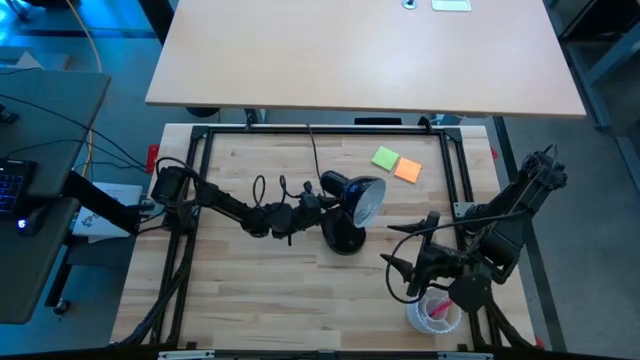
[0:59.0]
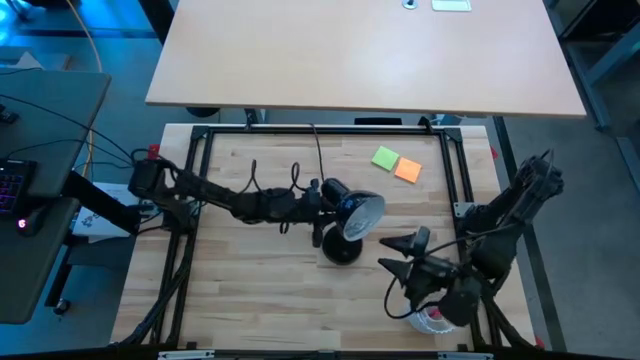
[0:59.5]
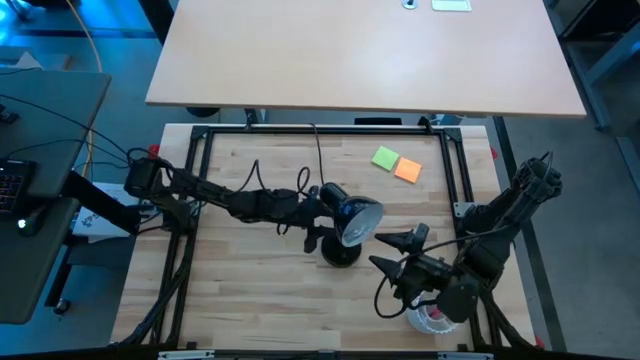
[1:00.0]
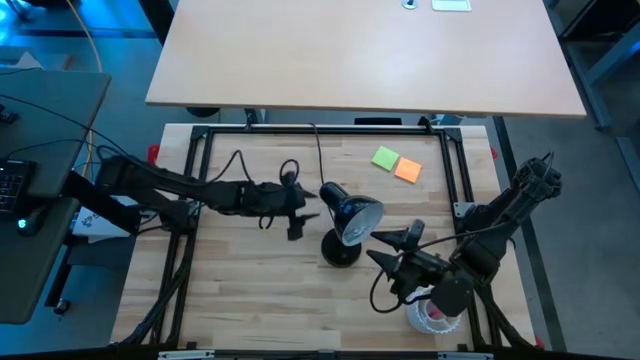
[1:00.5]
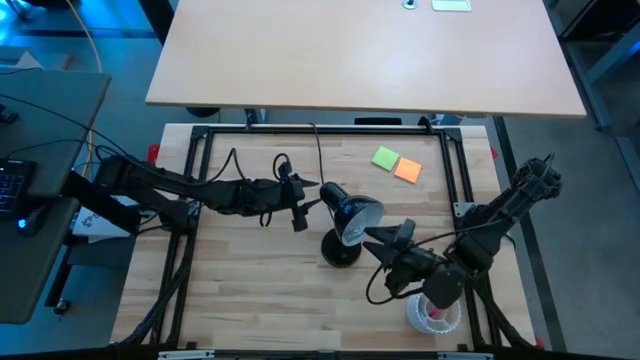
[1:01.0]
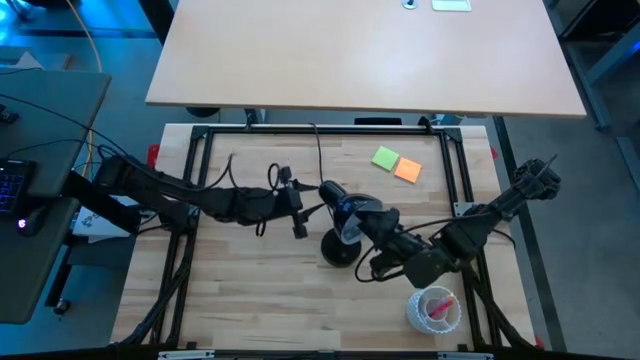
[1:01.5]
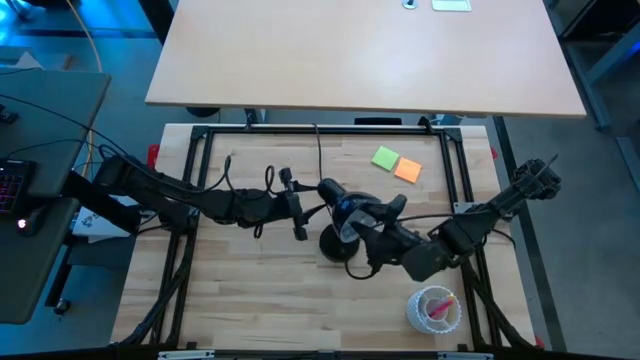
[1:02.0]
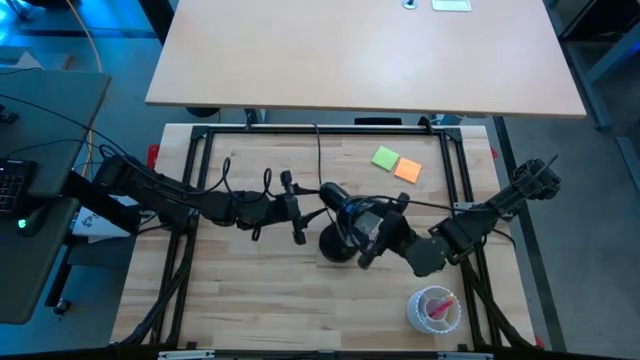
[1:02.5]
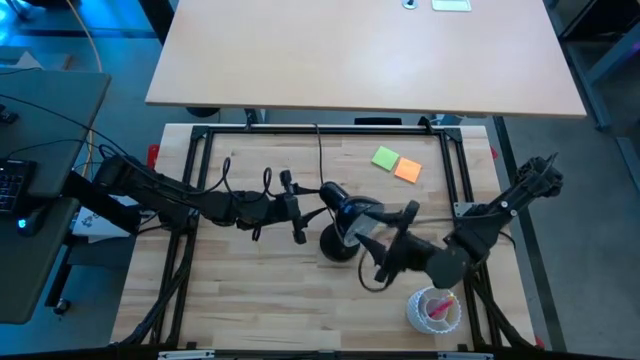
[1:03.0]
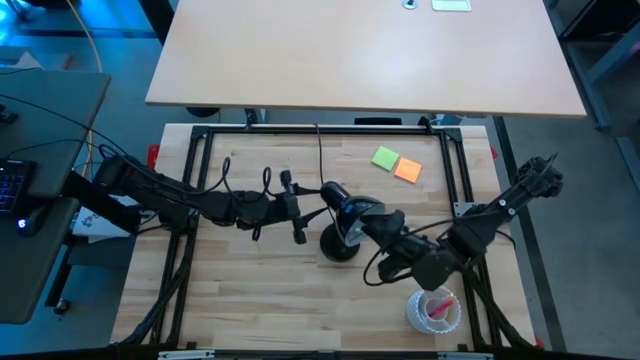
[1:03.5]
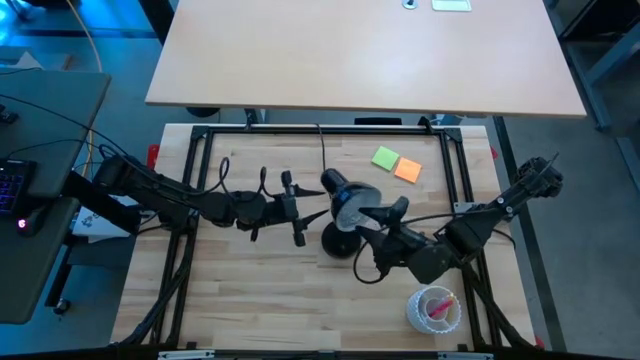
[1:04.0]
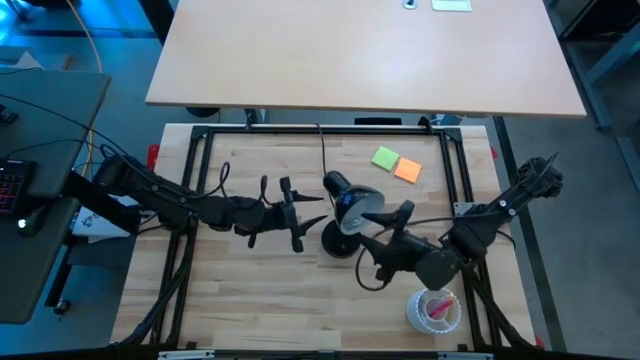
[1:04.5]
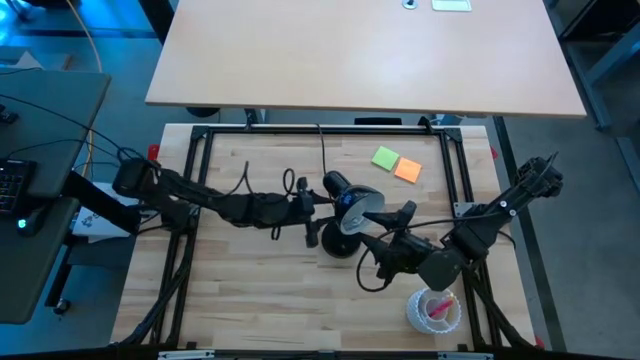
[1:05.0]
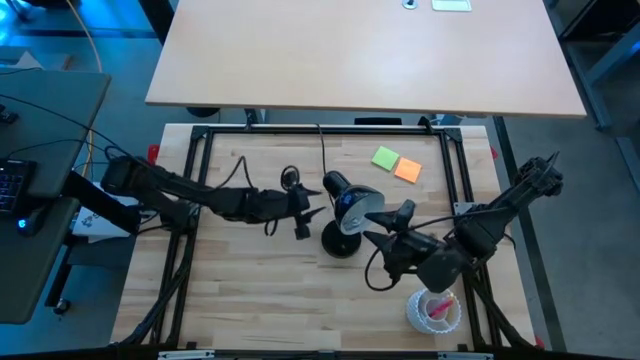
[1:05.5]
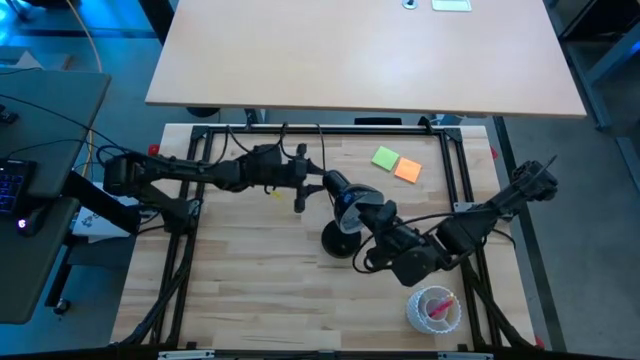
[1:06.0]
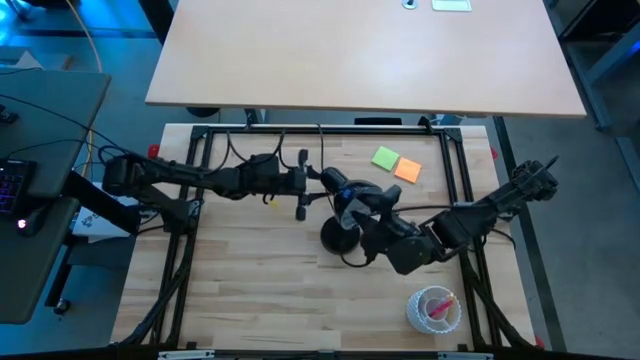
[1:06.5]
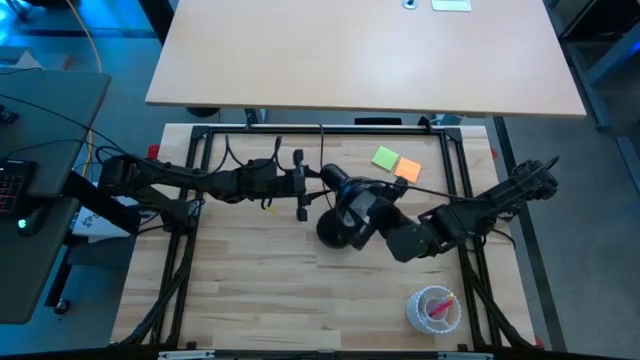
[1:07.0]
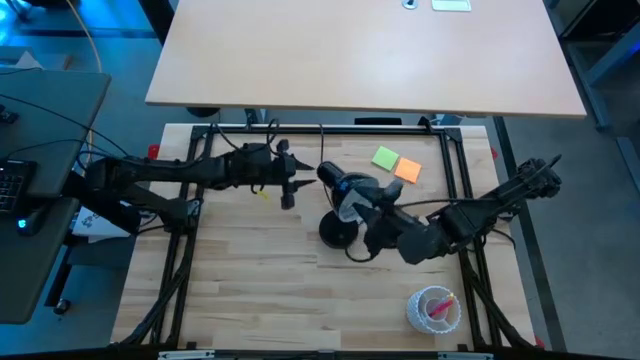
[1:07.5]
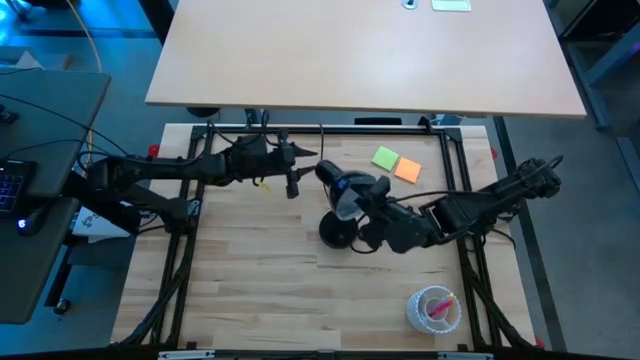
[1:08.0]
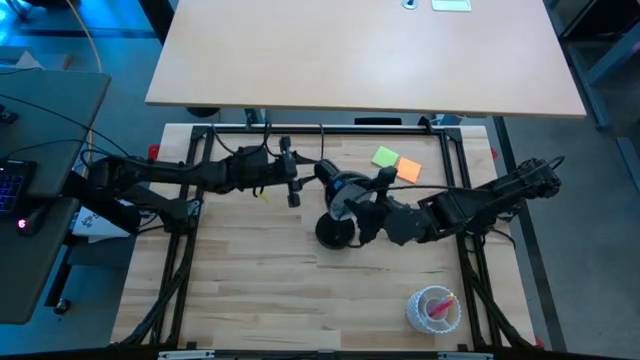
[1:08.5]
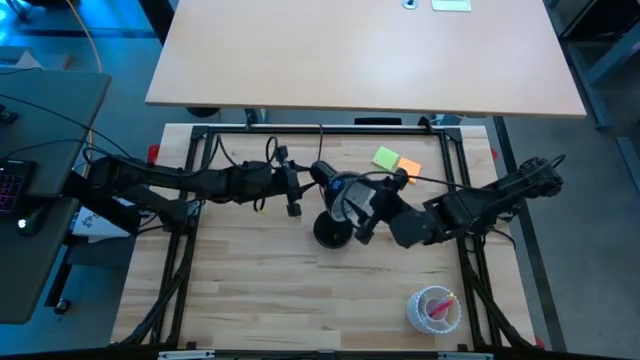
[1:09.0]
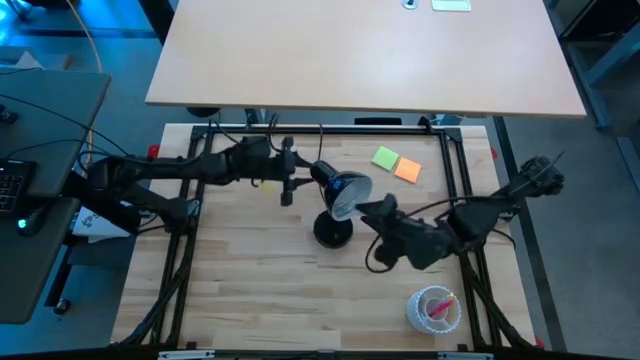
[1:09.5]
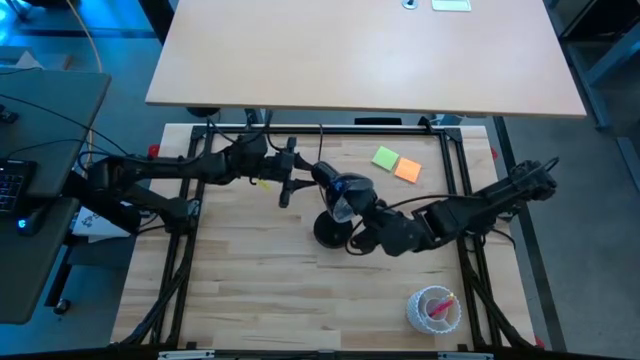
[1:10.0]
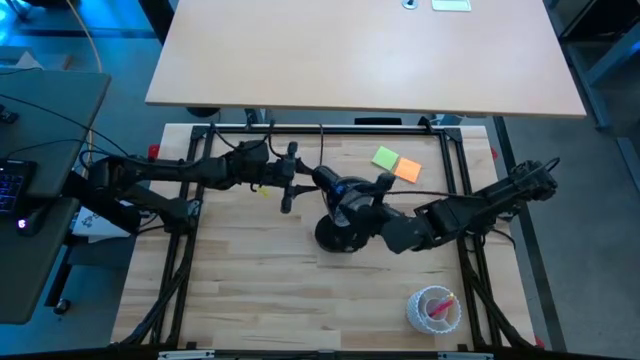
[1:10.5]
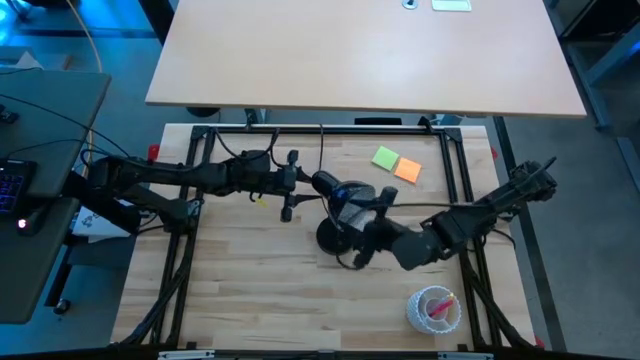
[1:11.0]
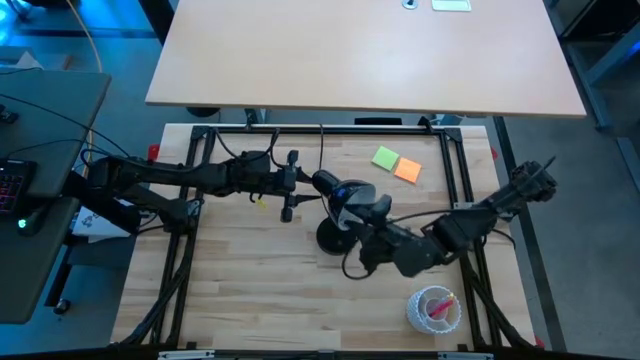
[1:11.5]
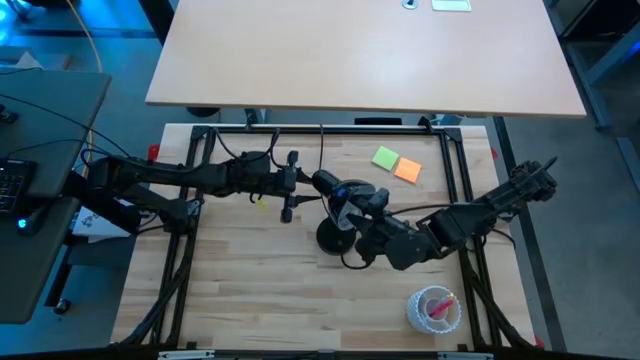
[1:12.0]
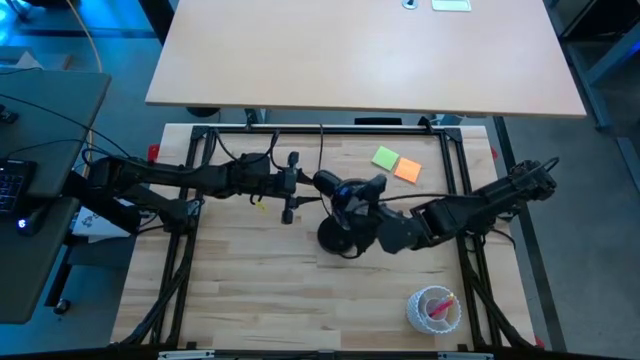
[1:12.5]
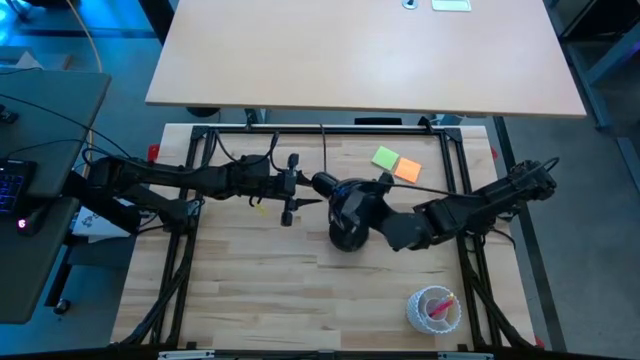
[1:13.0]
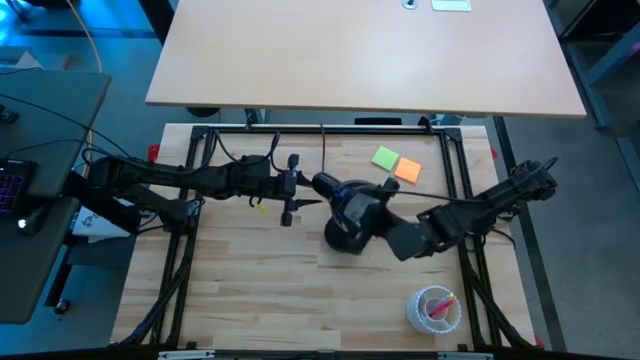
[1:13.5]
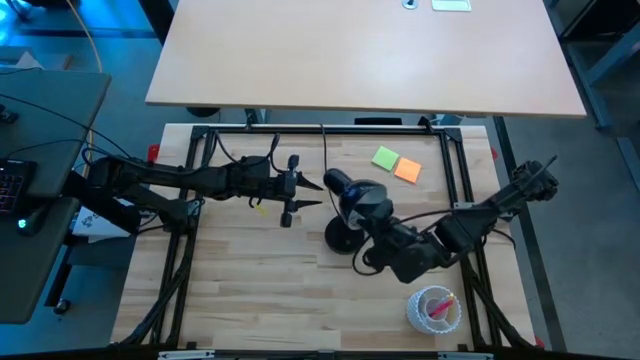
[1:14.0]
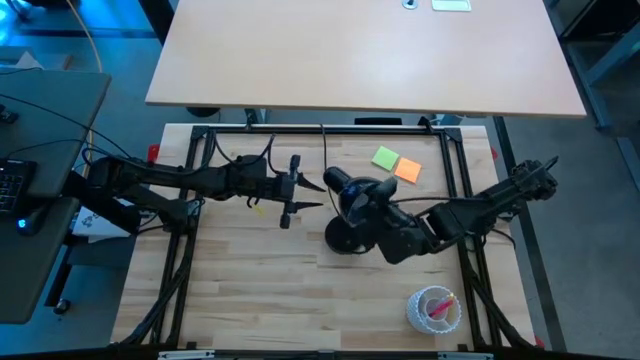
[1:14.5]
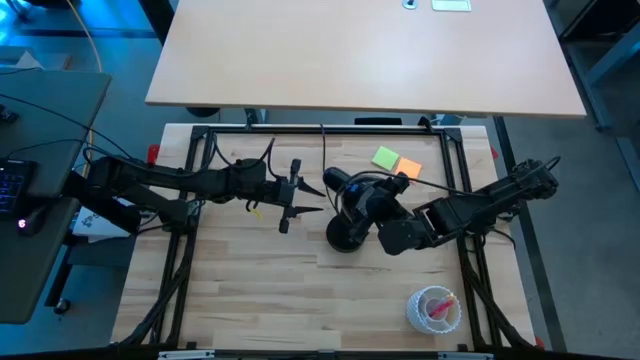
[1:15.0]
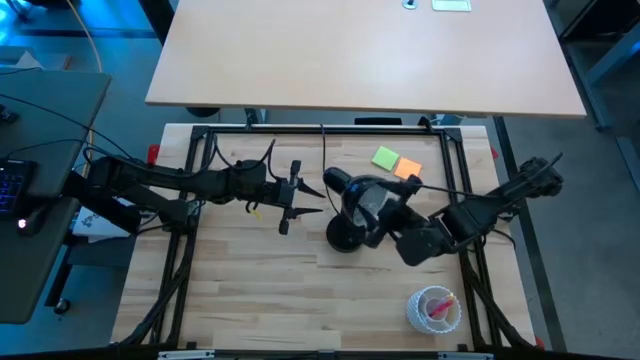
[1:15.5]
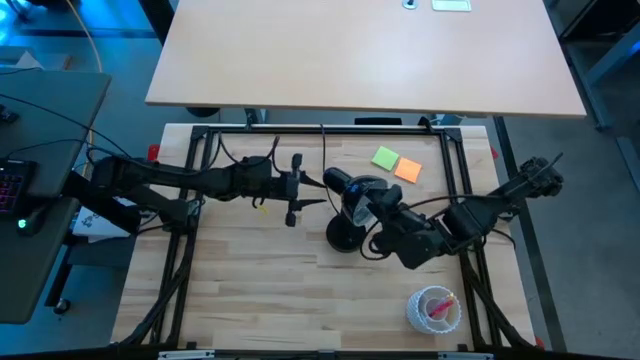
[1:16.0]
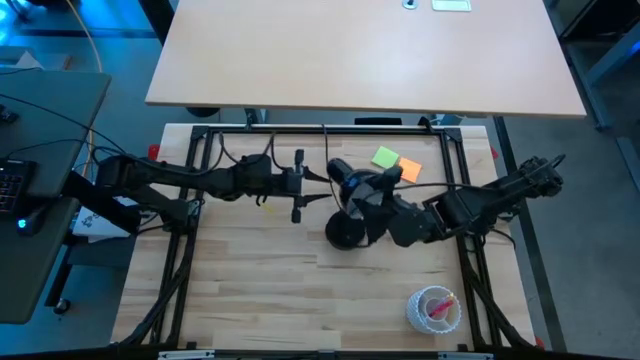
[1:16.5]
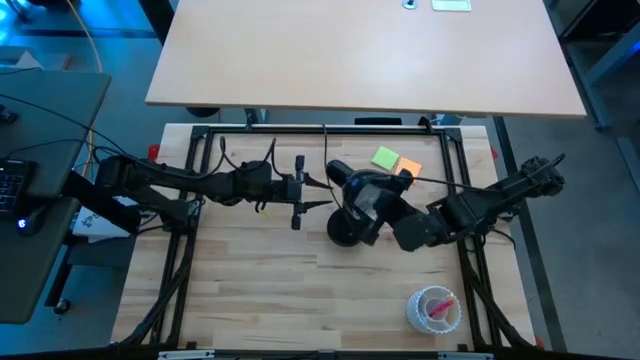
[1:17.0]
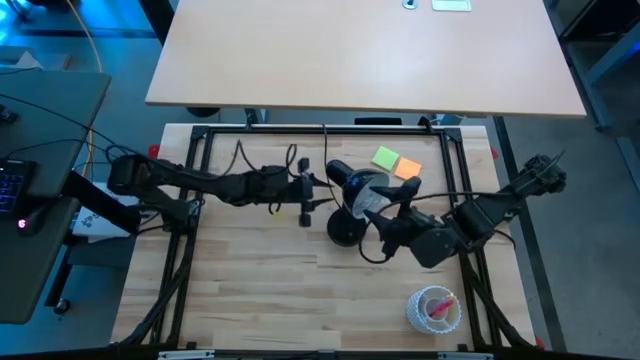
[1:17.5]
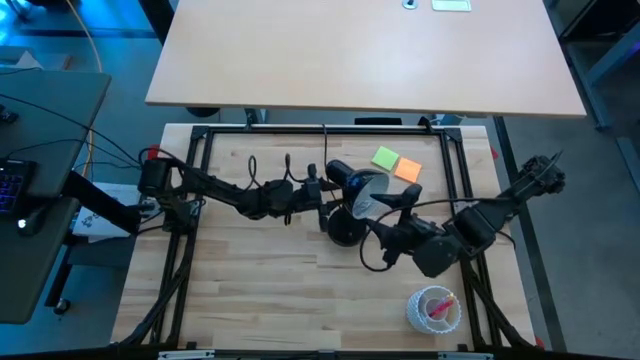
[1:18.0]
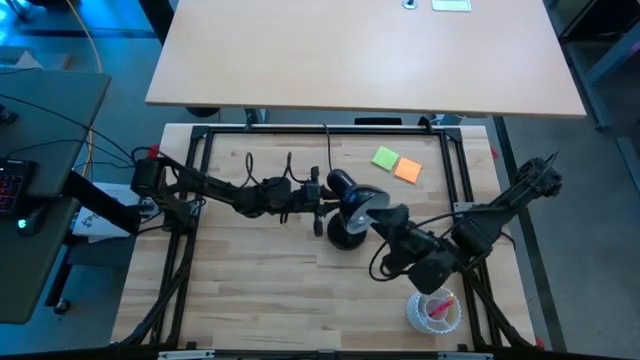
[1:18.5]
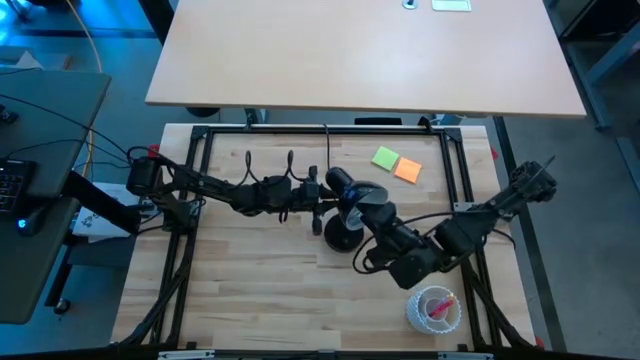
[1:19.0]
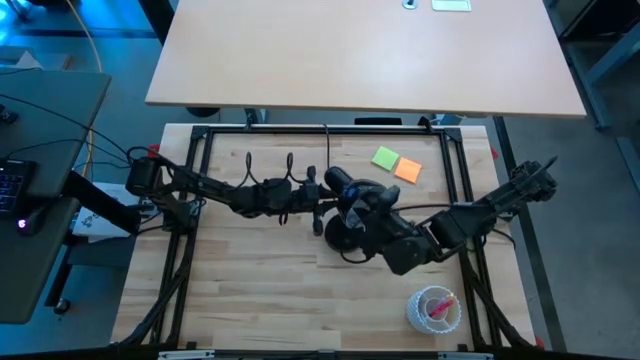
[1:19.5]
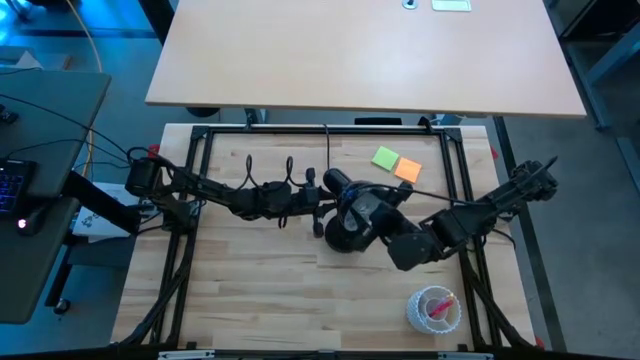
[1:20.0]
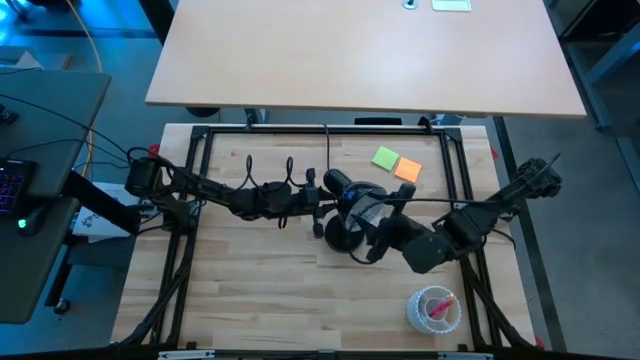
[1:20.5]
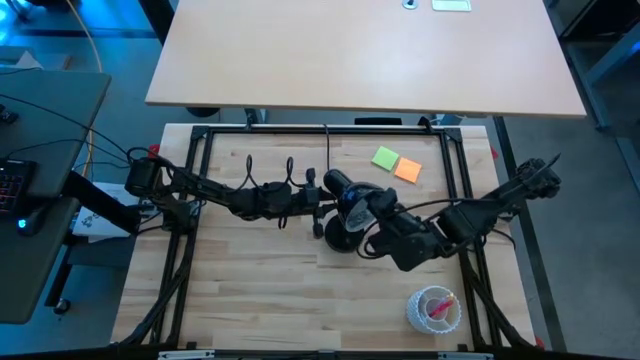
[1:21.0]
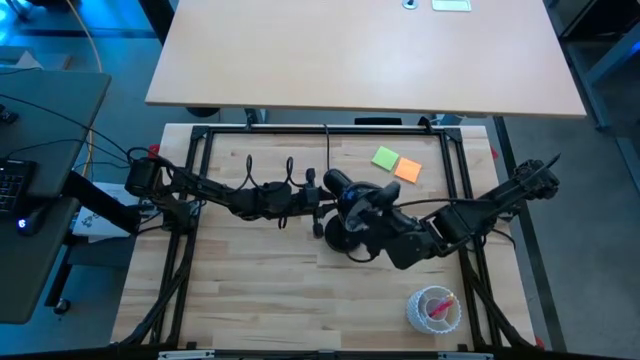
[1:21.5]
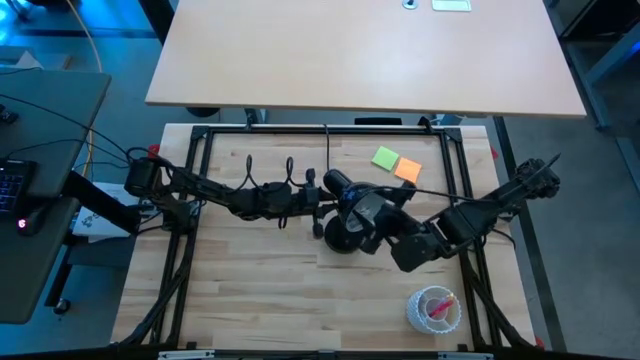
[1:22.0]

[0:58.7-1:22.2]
Task: Screw lightbulb
Insert the white lightbulb into the black lamp
